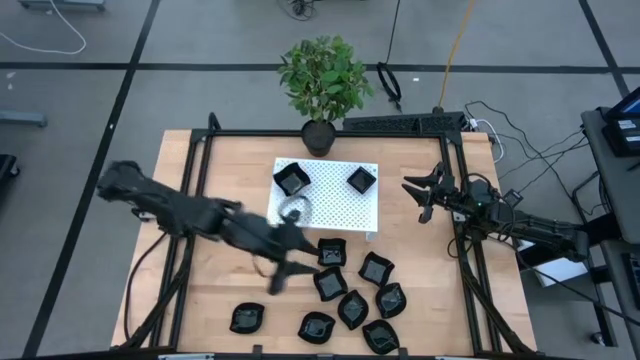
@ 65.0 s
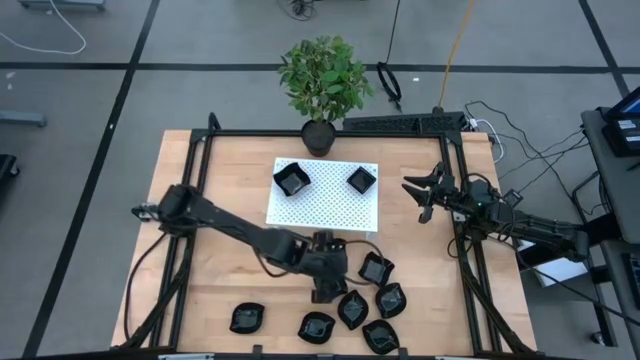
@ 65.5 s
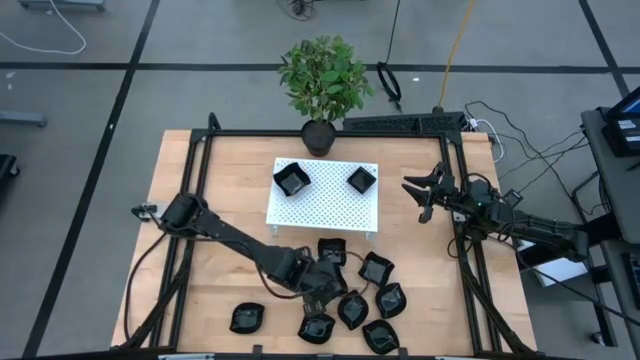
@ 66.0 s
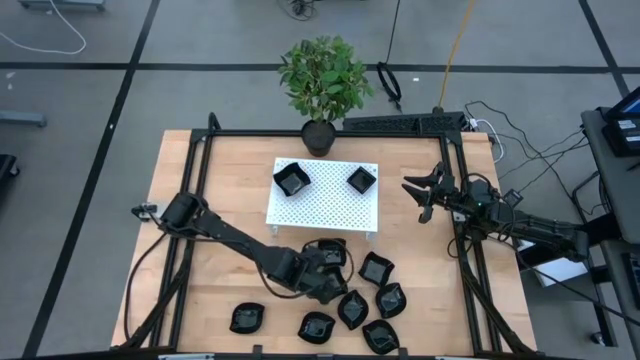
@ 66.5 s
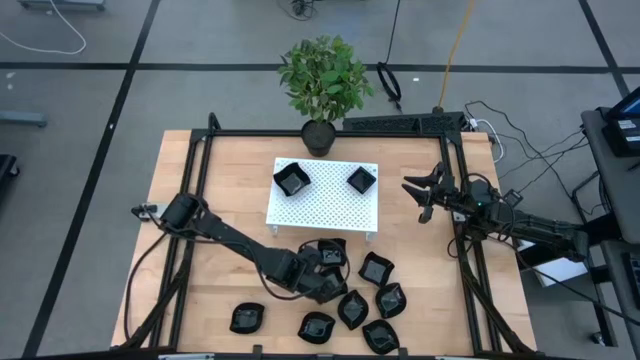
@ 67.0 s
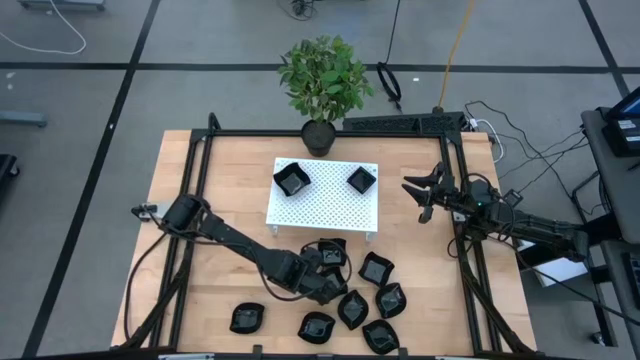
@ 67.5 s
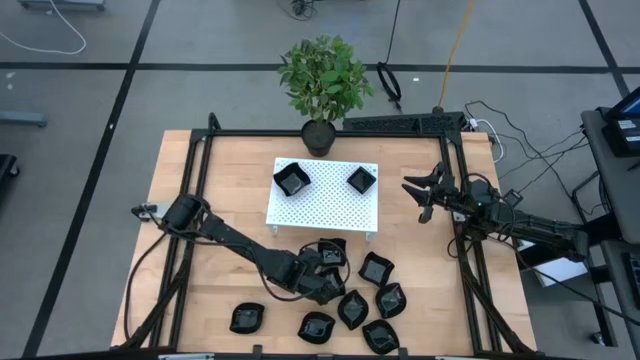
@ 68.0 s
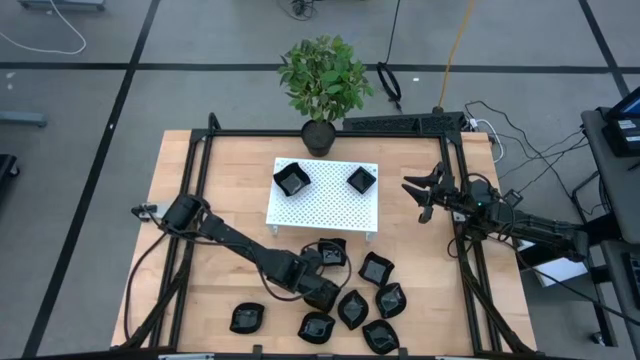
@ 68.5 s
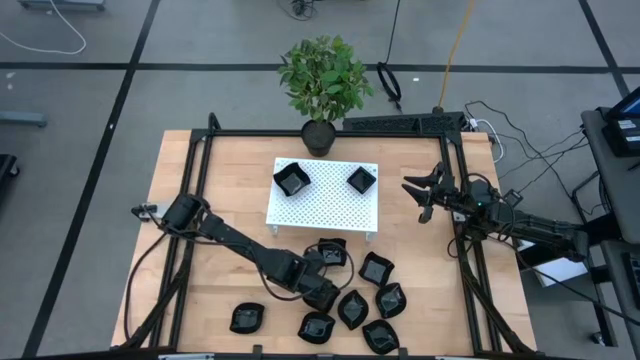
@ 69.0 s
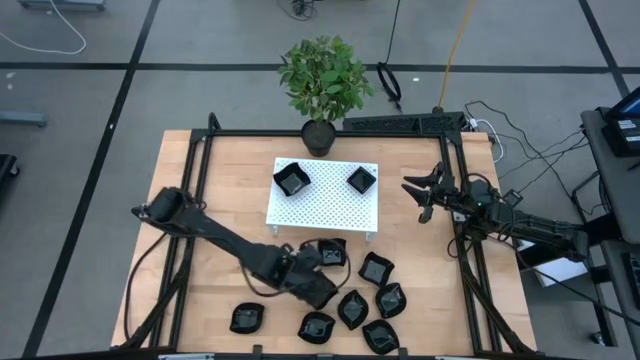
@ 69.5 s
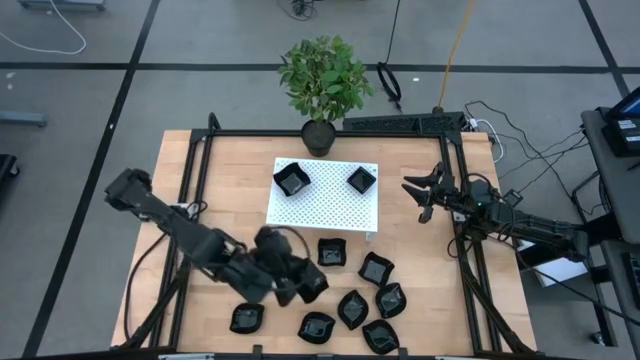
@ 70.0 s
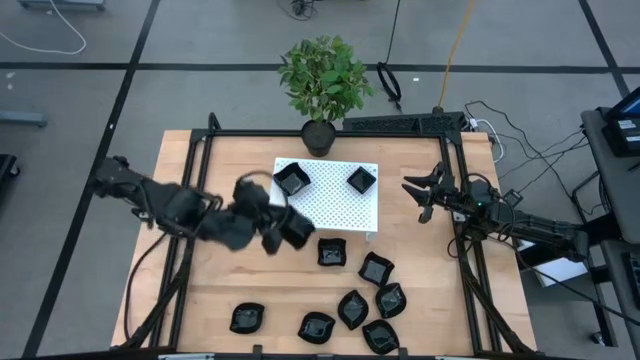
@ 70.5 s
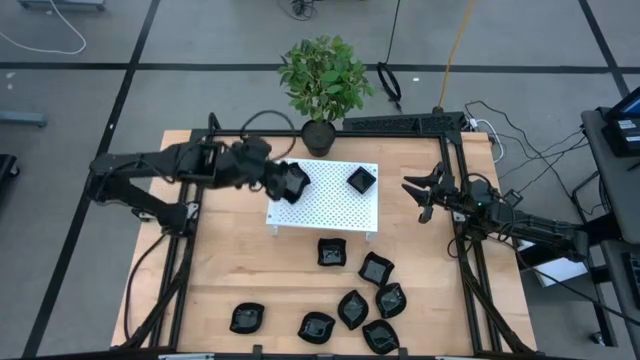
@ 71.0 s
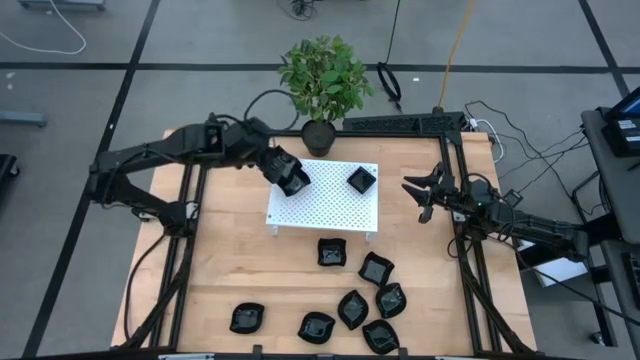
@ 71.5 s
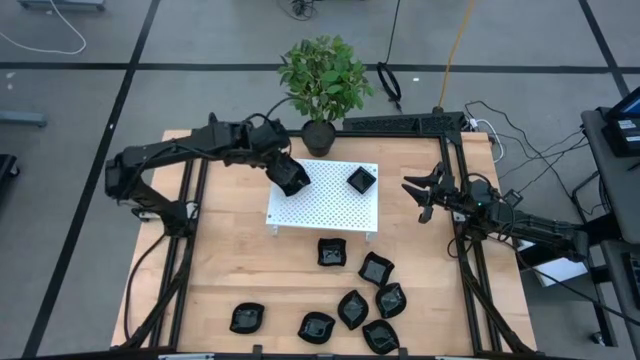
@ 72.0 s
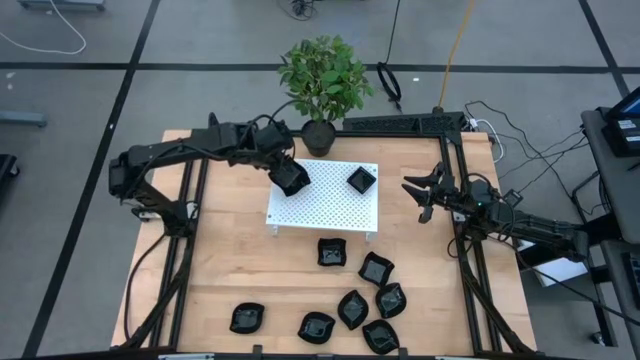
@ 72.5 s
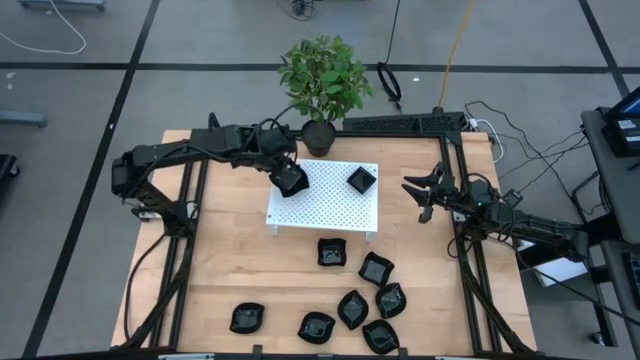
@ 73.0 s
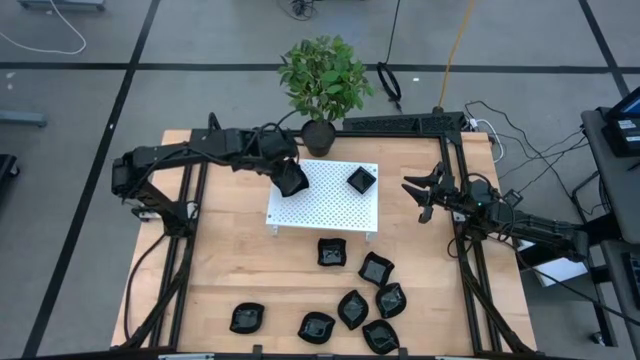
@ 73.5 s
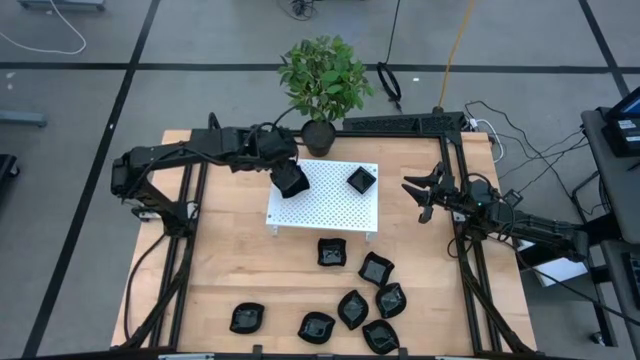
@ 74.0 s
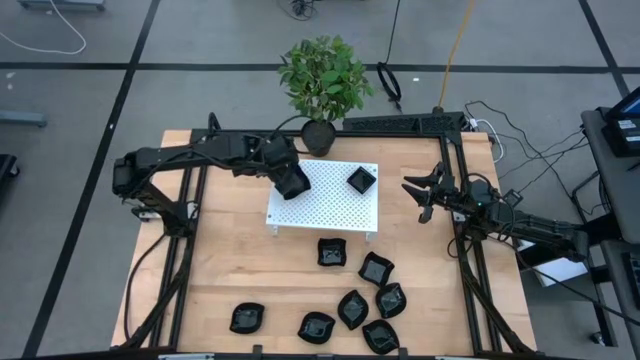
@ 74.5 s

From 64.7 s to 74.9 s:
Task: Pick & Place Mini shaped plates
Stack the black distorted square plate on top of the black distorted square plate on the shelf

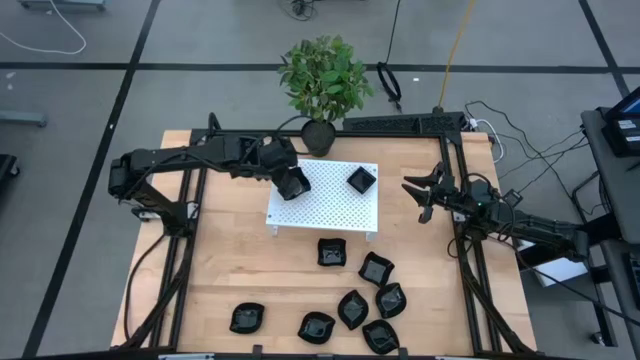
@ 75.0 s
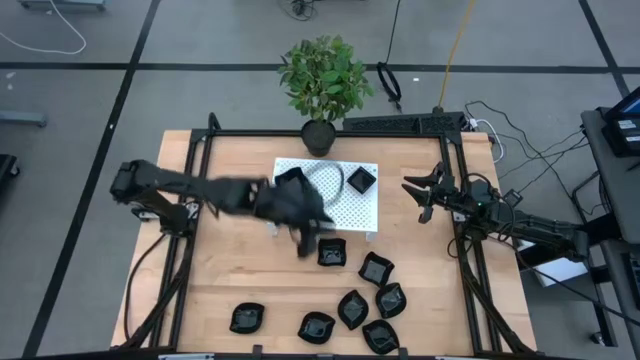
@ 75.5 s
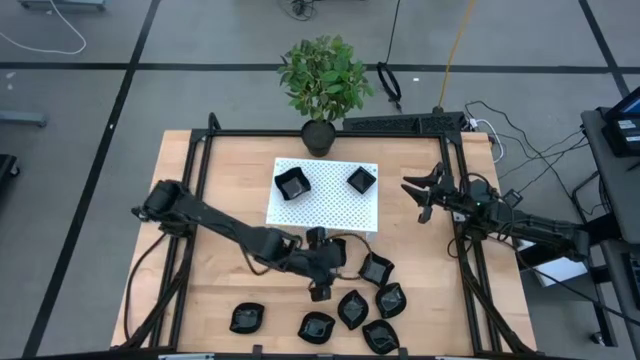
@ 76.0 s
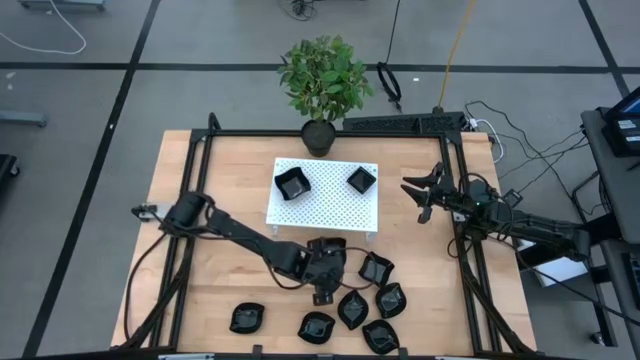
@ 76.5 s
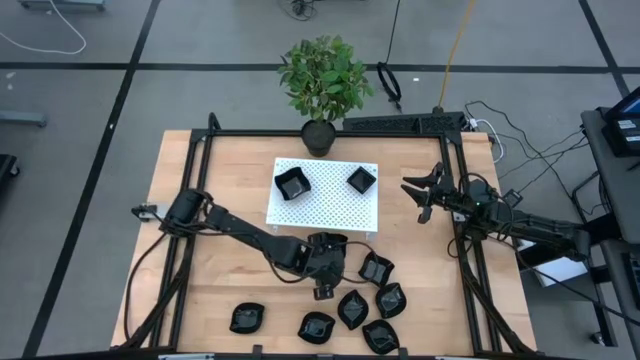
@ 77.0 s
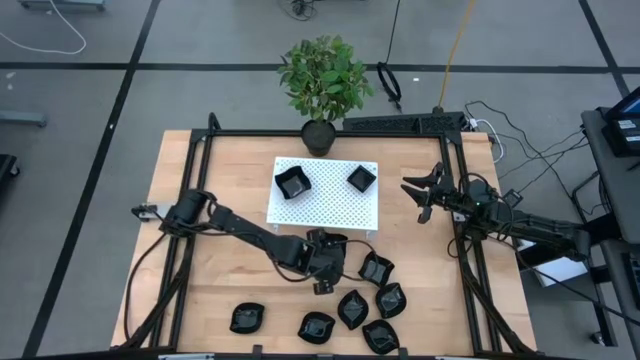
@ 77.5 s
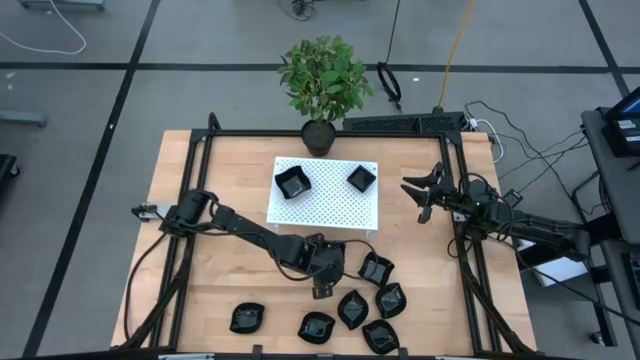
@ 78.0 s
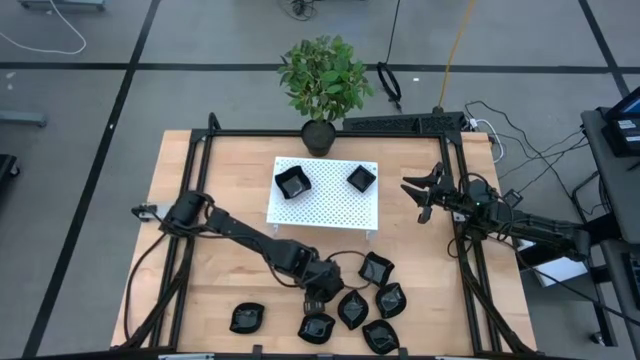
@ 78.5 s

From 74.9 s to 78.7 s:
Stack the black distorted square plate on top of the black distorted square plate on the shelf

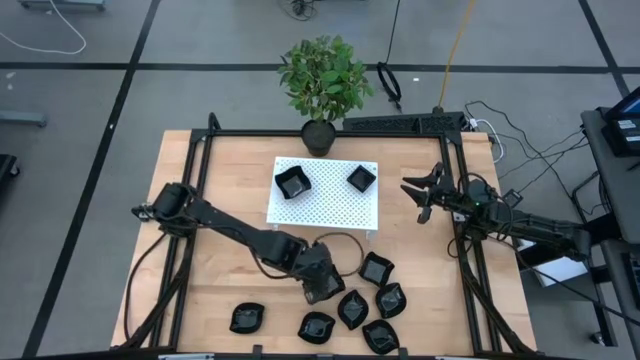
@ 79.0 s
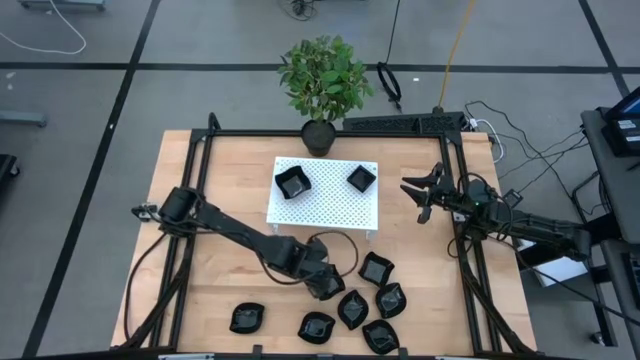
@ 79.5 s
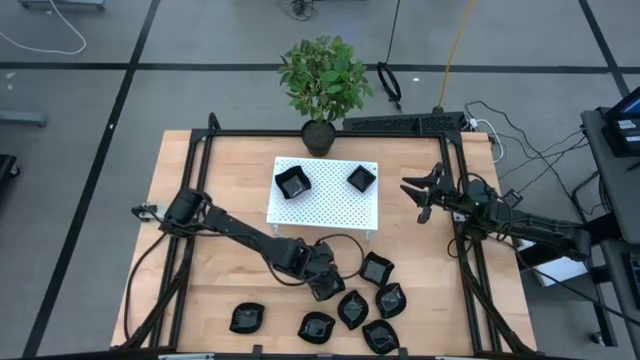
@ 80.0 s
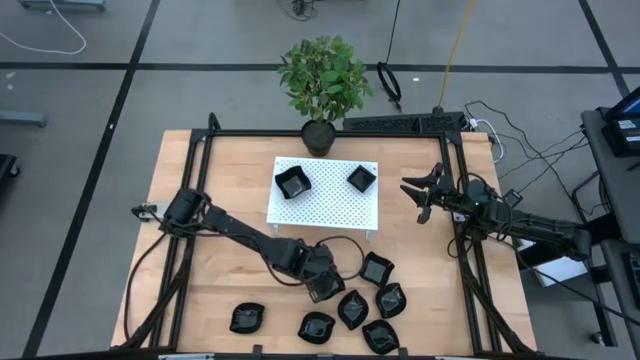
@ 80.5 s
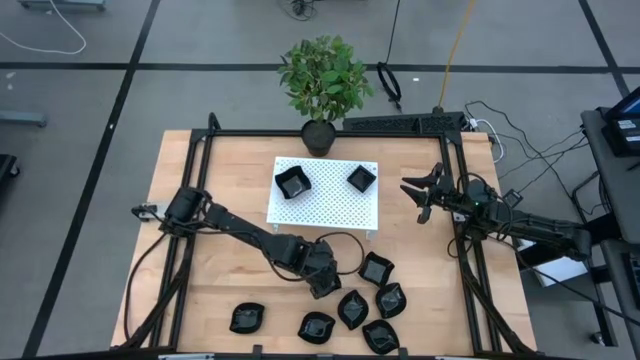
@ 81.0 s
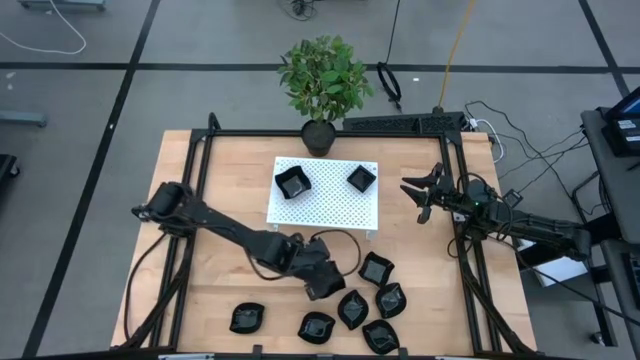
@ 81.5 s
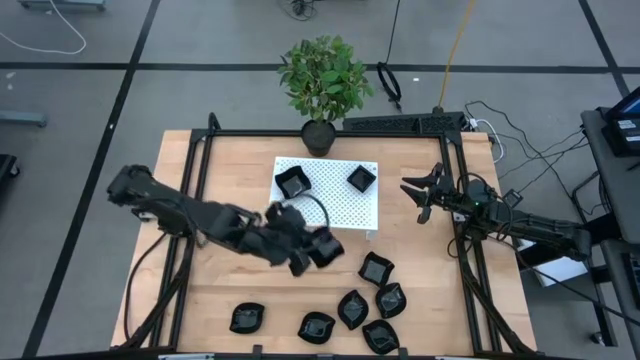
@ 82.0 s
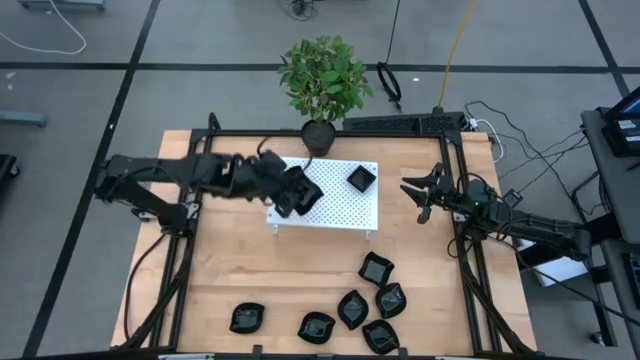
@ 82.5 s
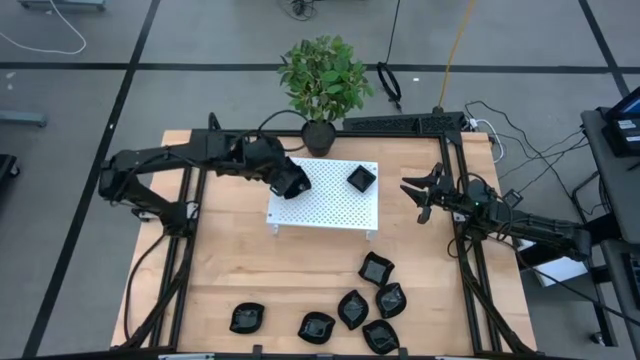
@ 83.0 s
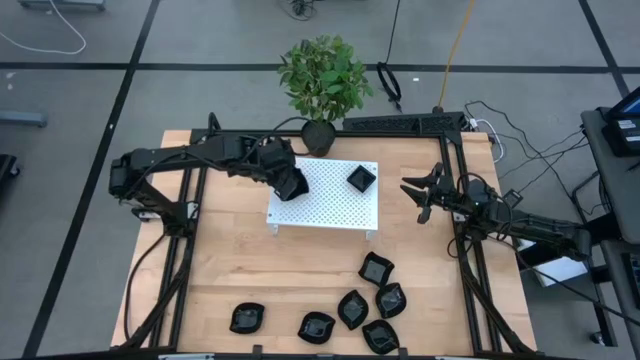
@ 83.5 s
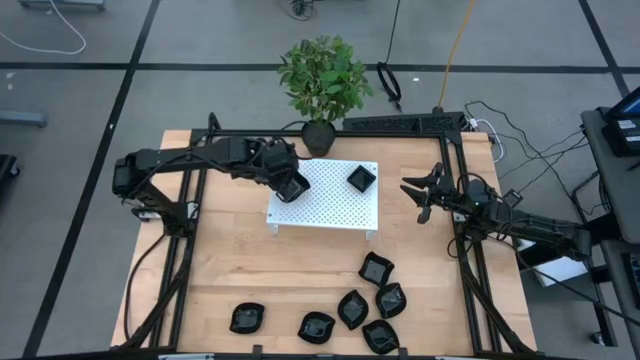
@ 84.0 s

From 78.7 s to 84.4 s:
Stack the black distorted square plate on top of the black distorted square plate on the shelf
